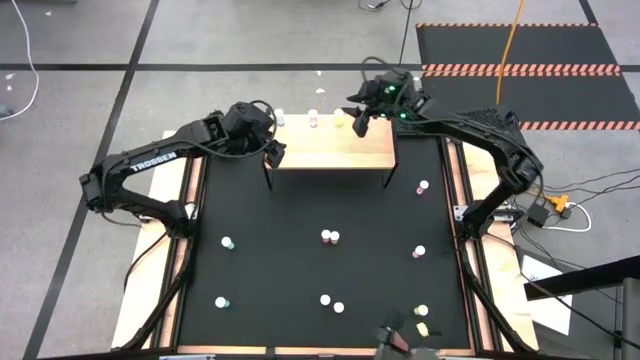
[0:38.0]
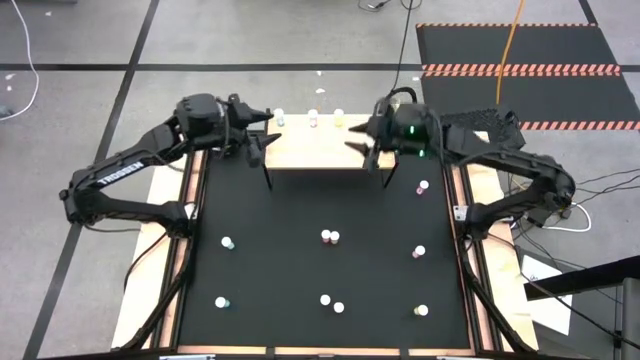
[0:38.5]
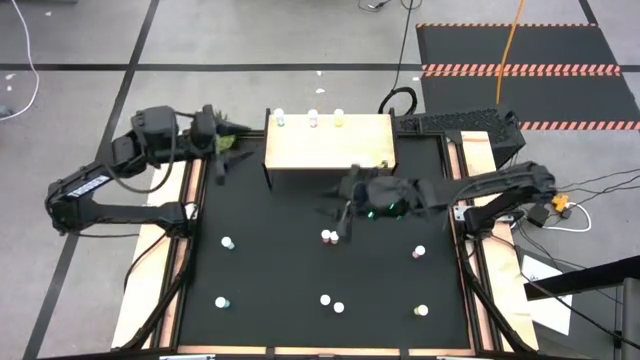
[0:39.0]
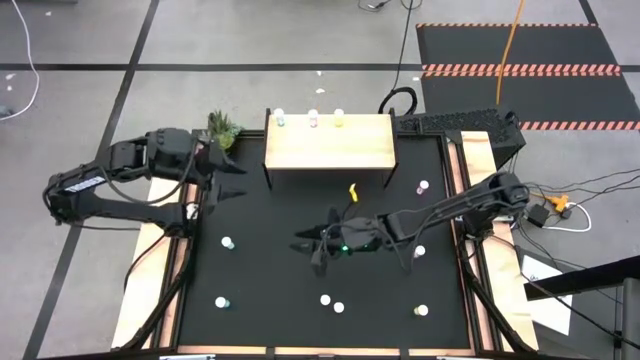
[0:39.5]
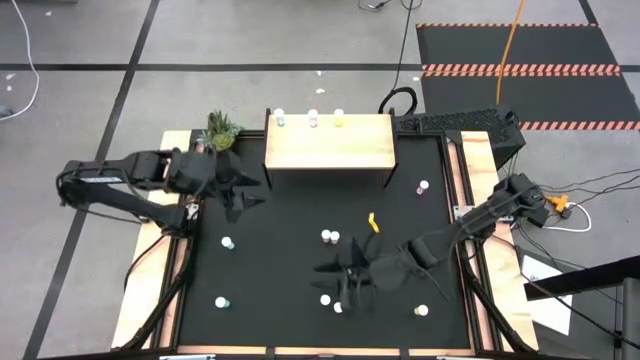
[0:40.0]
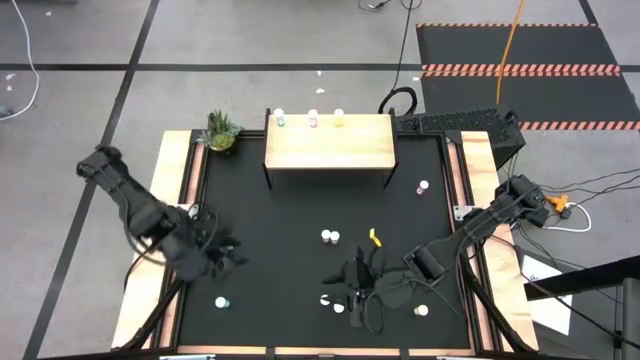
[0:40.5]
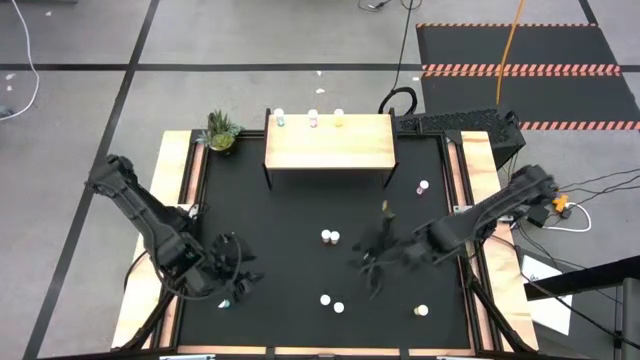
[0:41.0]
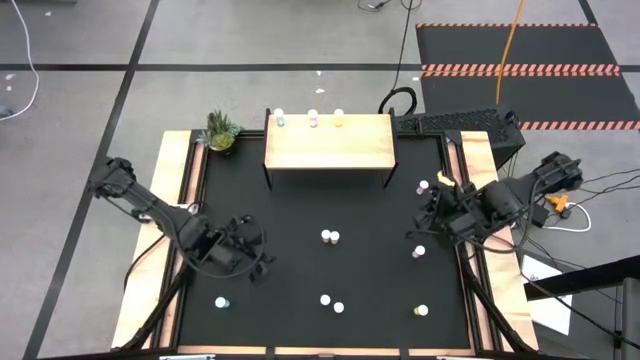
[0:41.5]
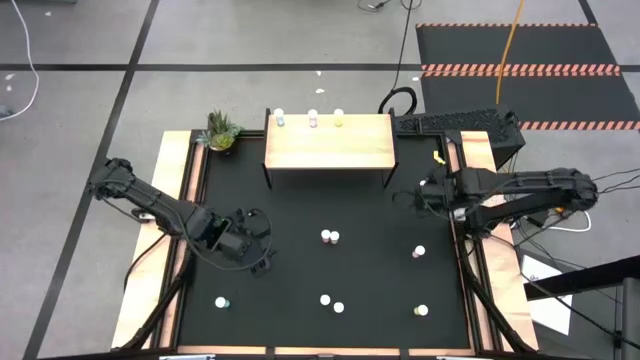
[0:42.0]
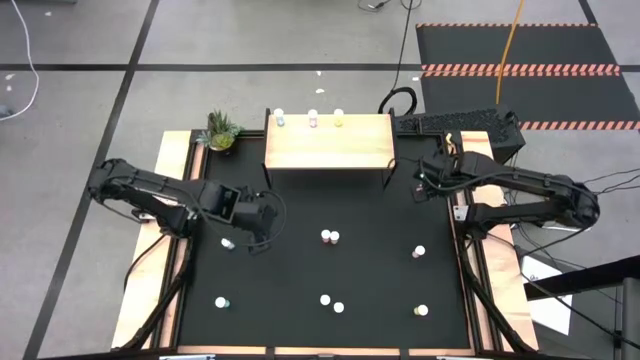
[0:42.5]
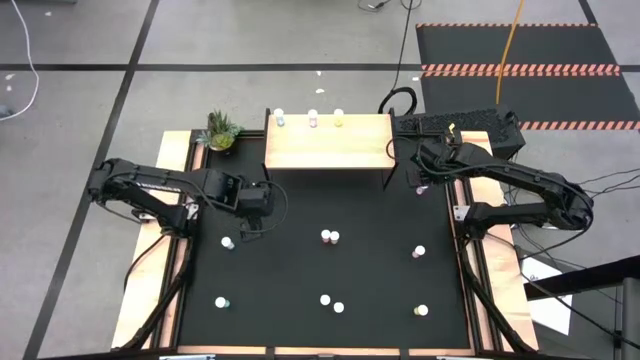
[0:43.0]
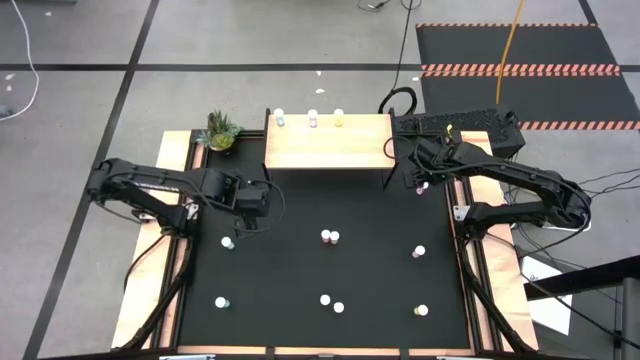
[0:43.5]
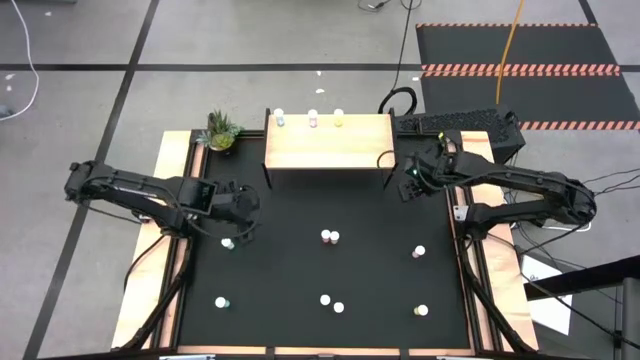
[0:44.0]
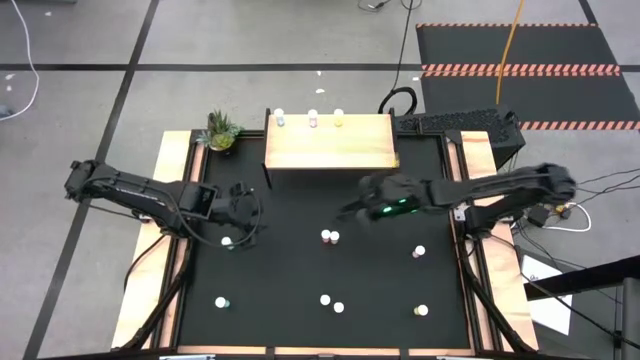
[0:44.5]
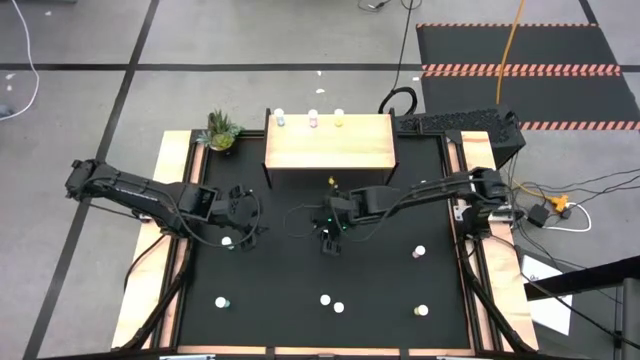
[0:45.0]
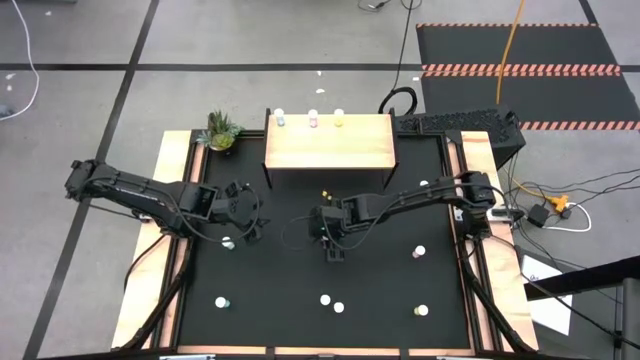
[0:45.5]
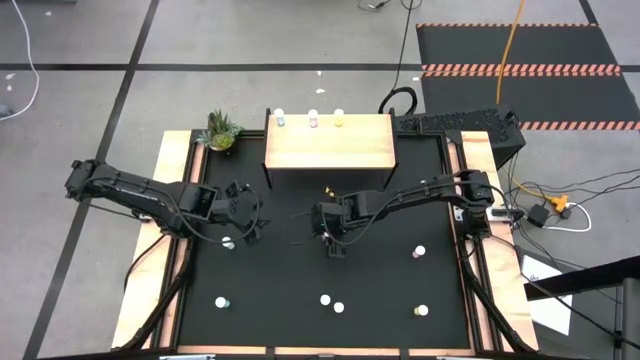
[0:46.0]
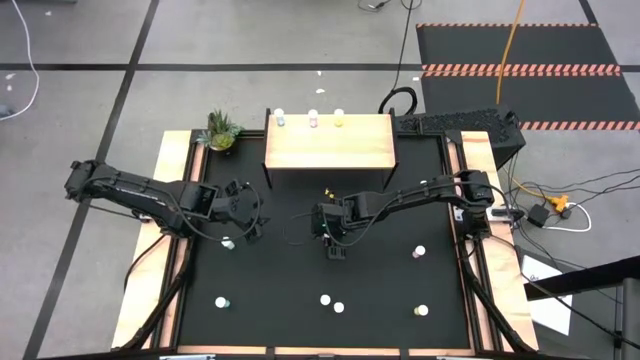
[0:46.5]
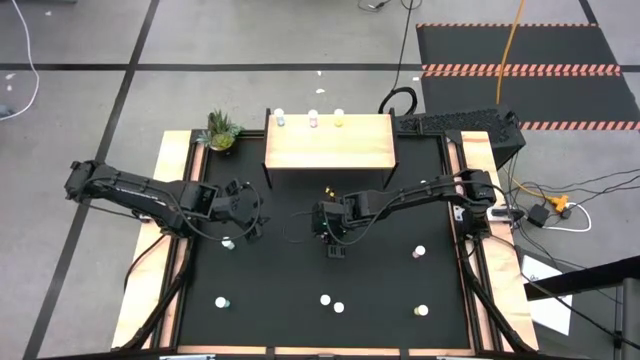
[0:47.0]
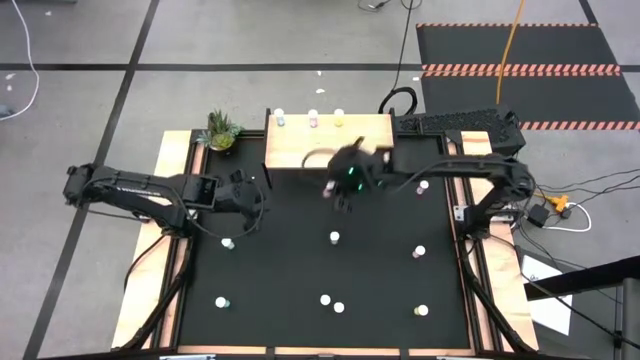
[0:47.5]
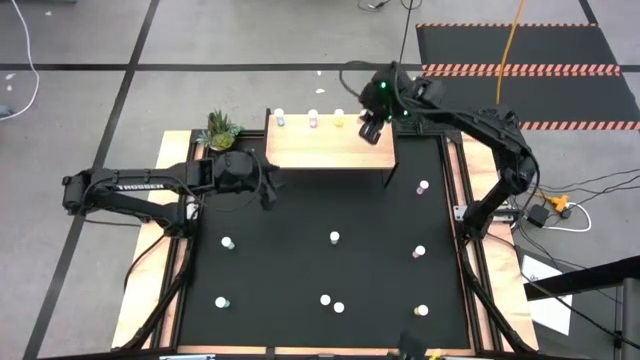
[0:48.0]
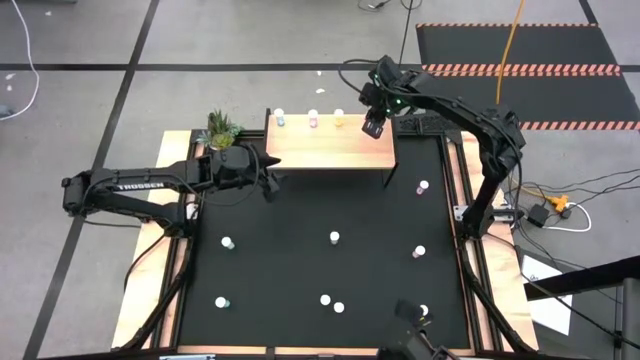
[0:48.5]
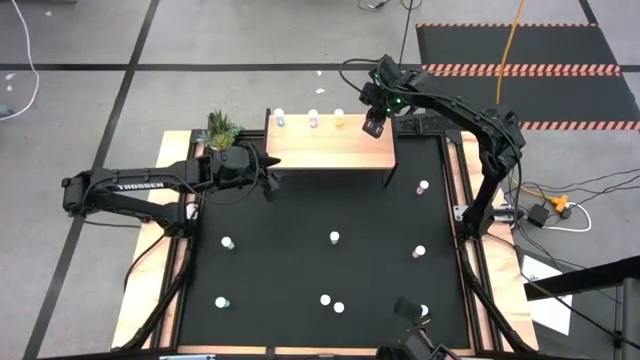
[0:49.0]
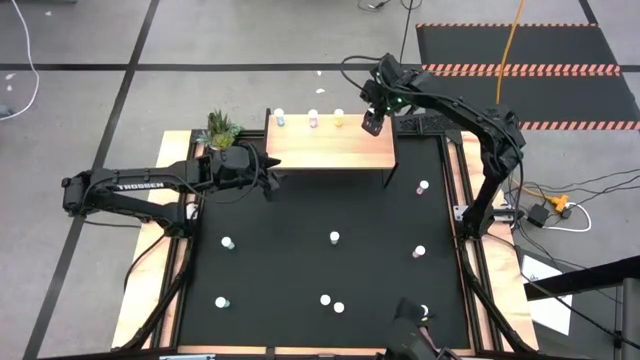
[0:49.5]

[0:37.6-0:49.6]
Task: Pick and place medicine bottles onto shelf by color
Put the top left pink pill bottle on the shelf

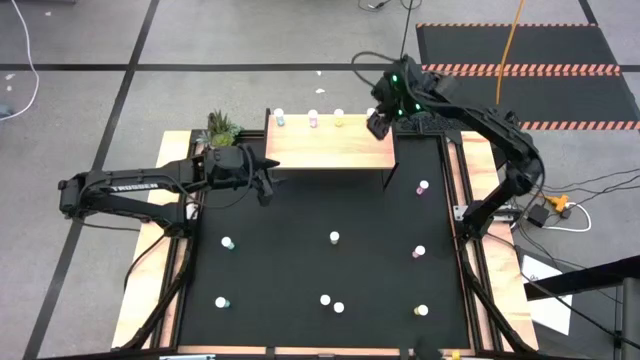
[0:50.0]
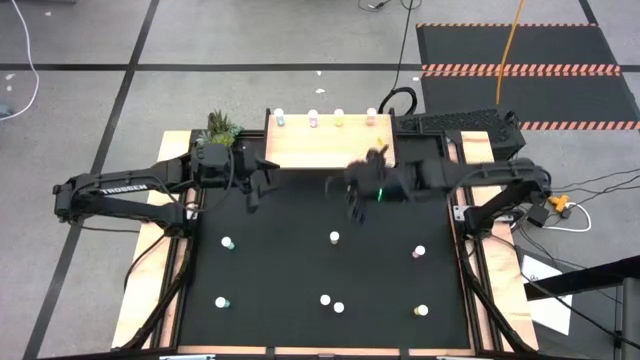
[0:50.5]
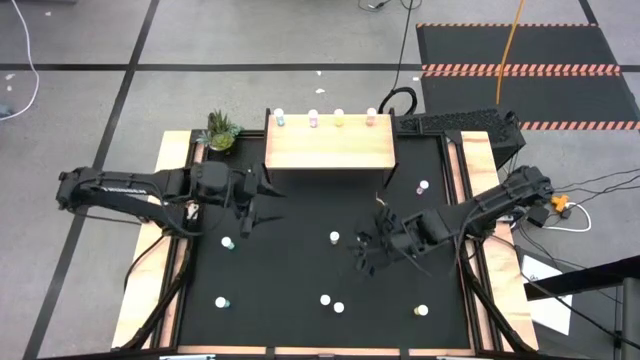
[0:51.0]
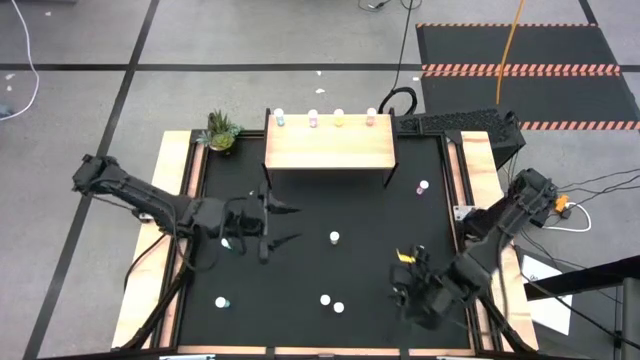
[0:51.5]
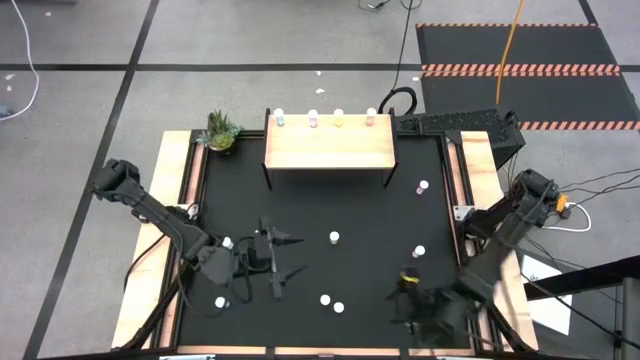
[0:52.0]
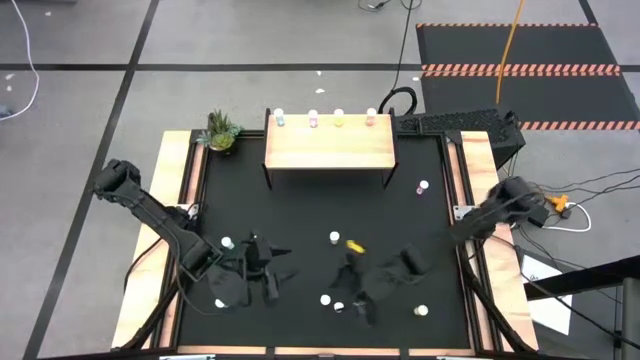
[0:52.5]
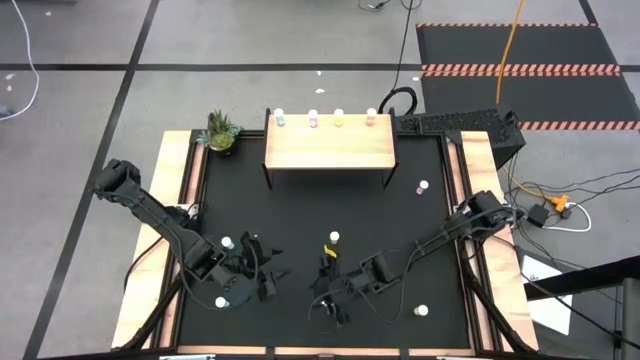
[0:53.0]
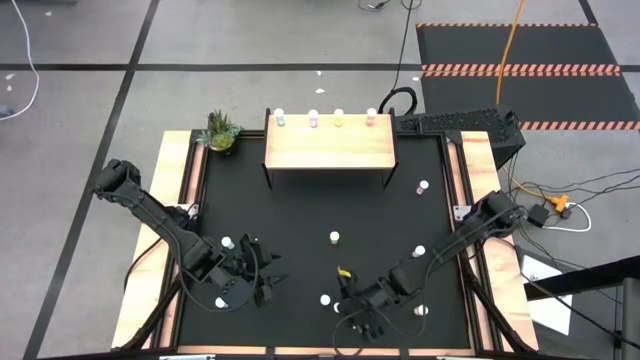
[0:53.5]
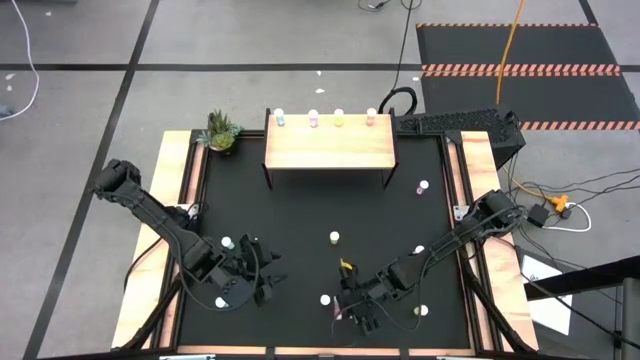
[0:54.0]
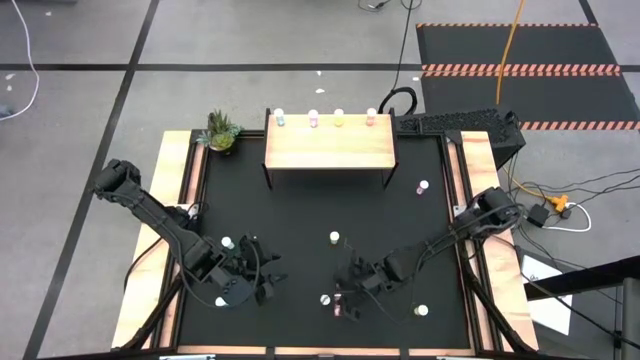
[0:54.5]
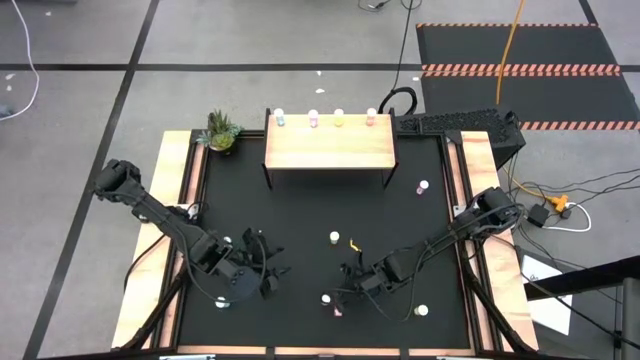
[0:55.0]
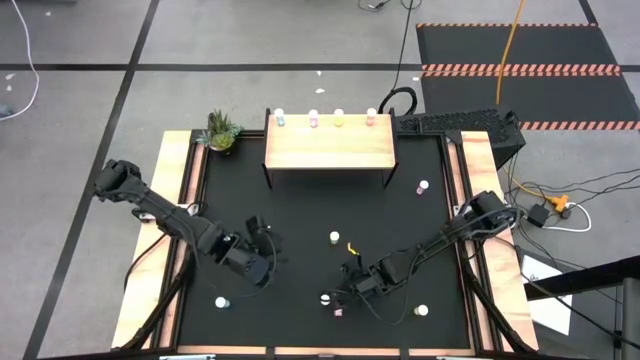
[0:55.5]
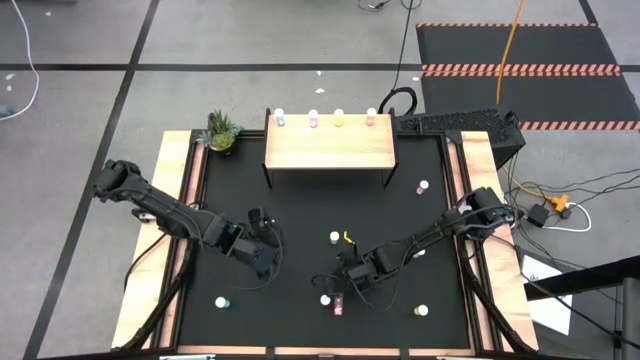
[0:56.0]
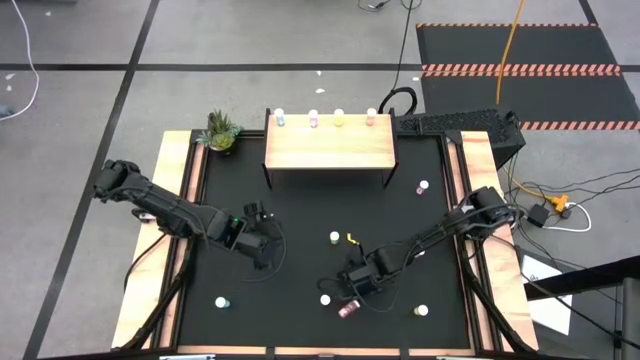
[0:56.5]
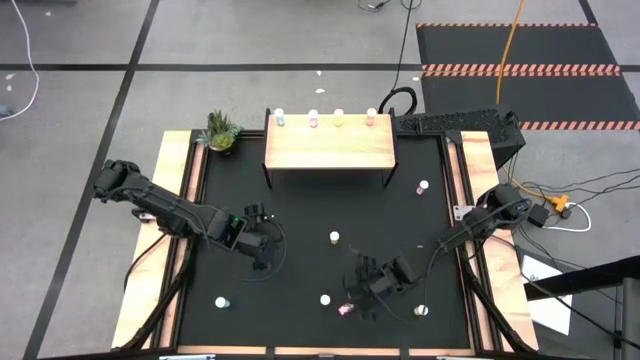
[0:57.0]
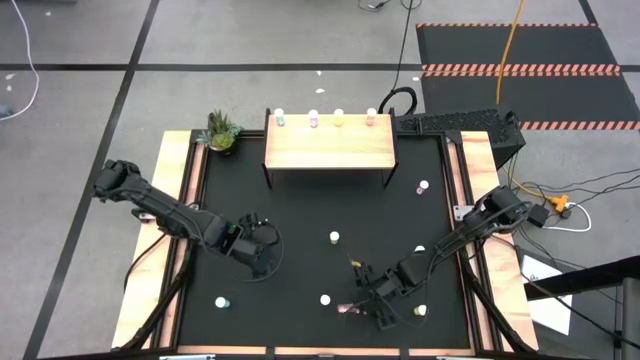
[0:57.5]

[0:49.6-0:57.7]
Put the bottom right pink pill bottle aligned with the other pink pill bottle on the shelf

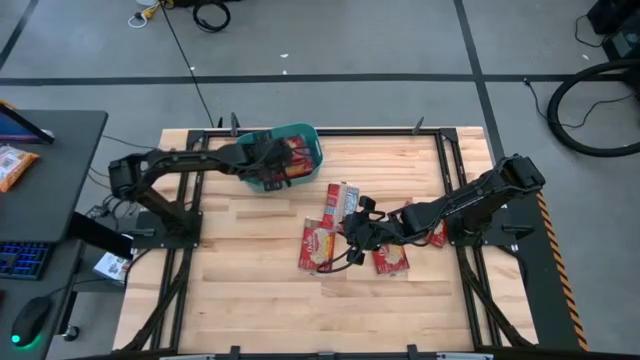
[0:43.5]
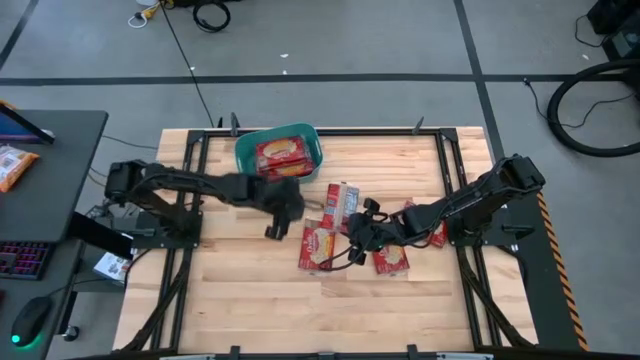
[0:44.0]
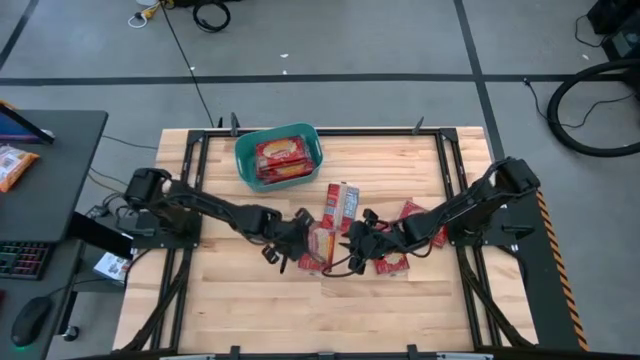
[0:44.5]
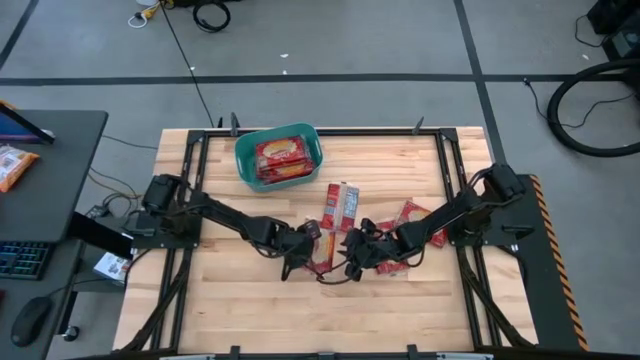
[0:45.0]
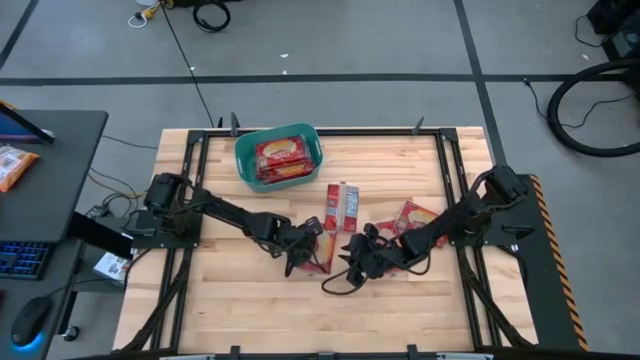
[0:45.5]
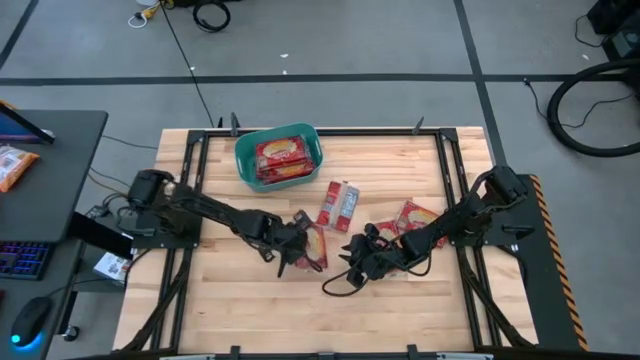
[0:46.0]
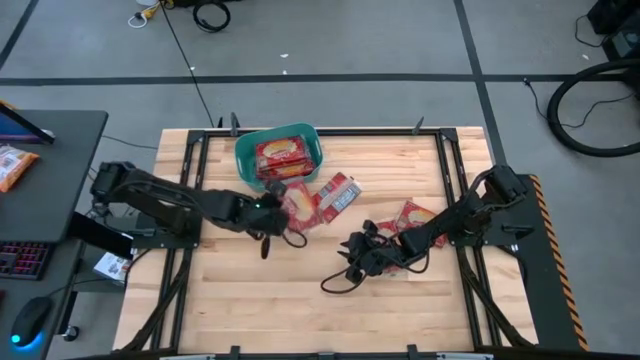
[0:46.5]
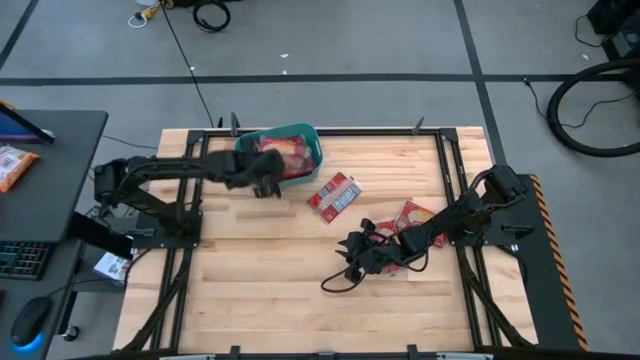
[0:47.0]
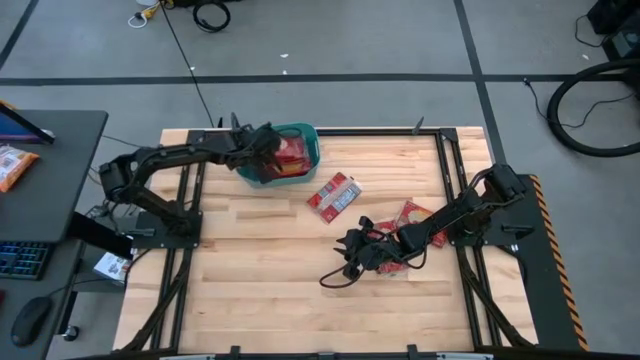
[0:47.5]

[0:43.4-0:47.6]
Task: Sort popcorn bags into baskets
Put the red popcorn bag into the green bin
